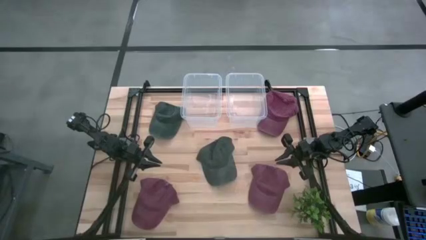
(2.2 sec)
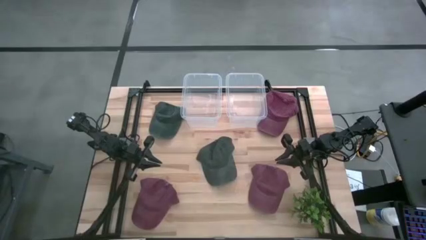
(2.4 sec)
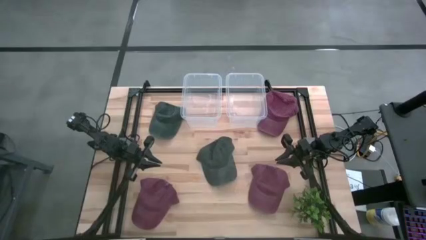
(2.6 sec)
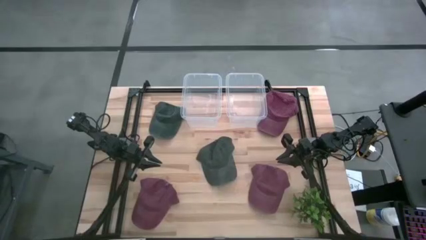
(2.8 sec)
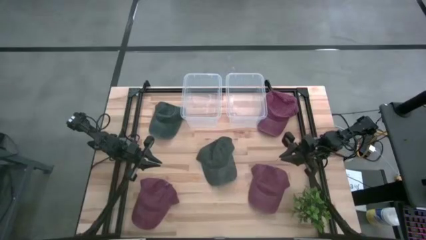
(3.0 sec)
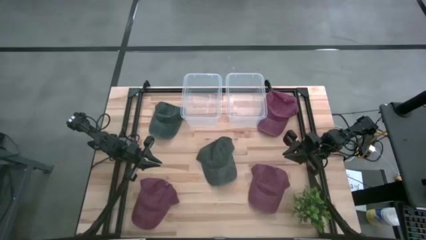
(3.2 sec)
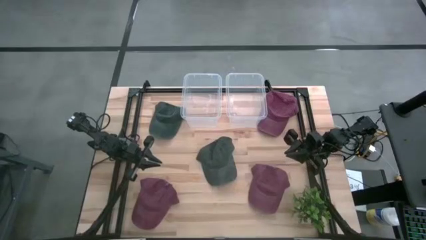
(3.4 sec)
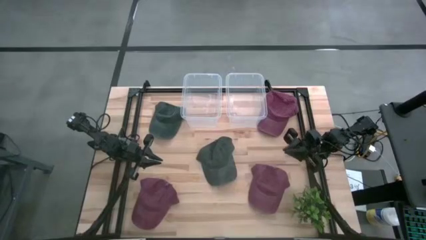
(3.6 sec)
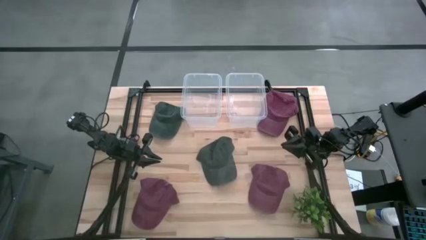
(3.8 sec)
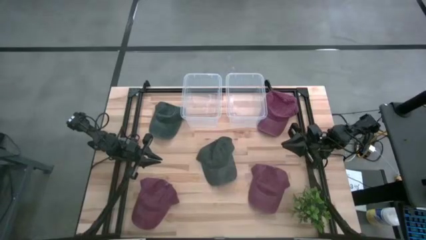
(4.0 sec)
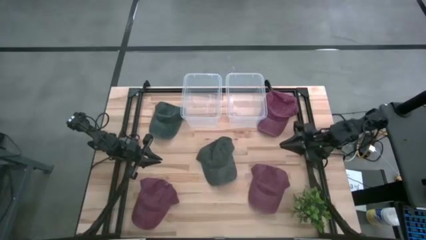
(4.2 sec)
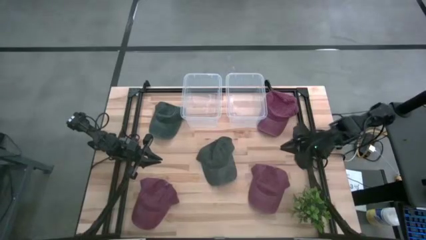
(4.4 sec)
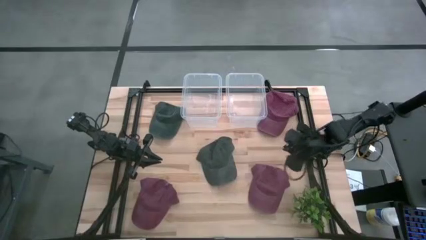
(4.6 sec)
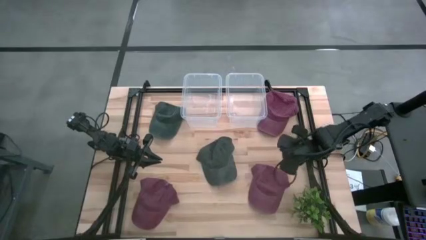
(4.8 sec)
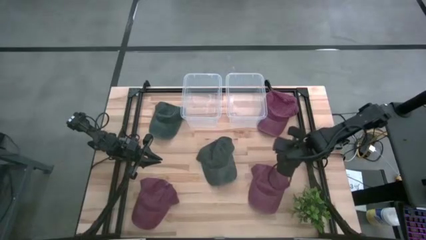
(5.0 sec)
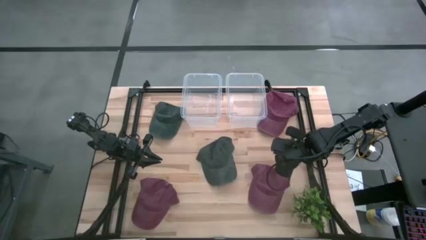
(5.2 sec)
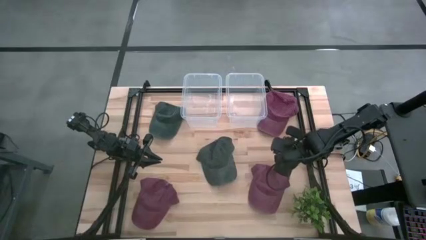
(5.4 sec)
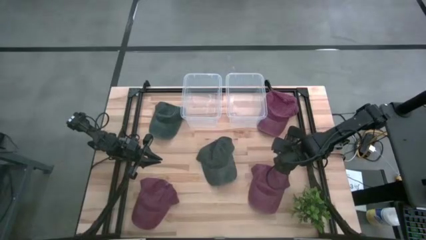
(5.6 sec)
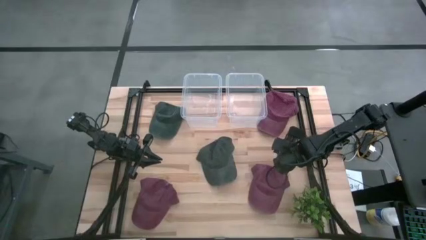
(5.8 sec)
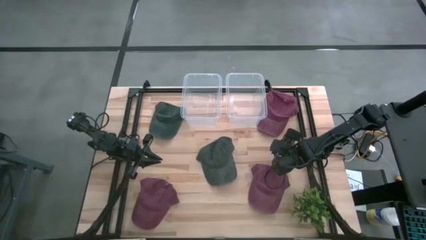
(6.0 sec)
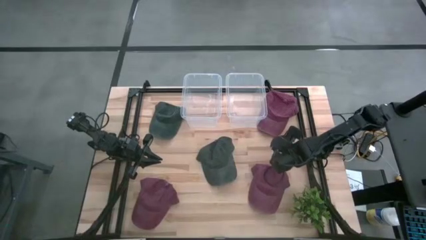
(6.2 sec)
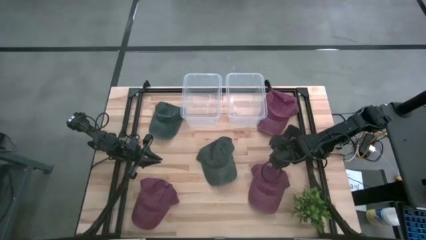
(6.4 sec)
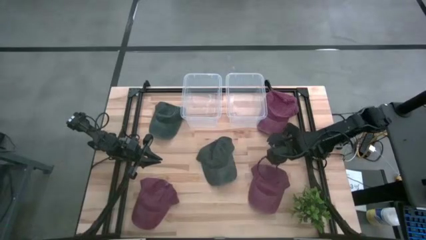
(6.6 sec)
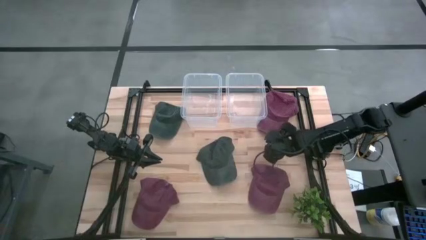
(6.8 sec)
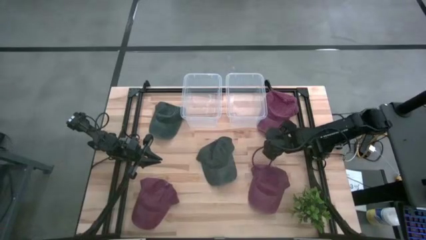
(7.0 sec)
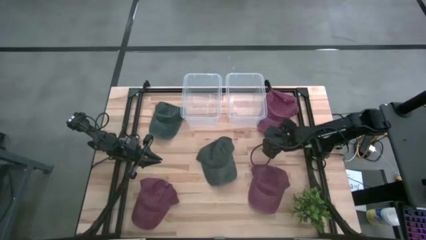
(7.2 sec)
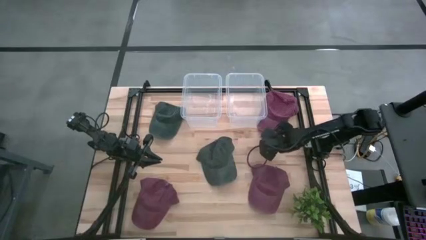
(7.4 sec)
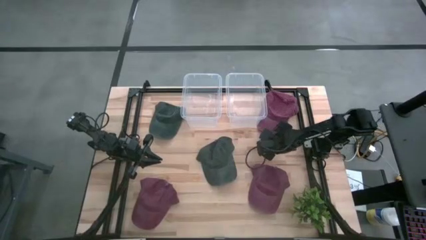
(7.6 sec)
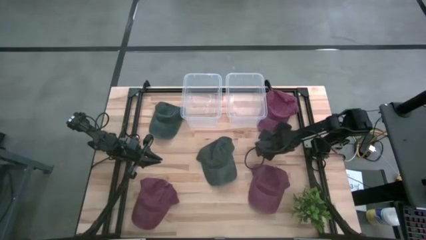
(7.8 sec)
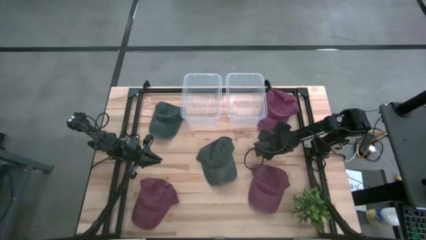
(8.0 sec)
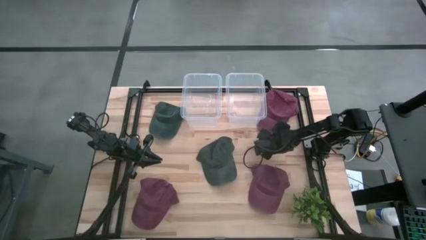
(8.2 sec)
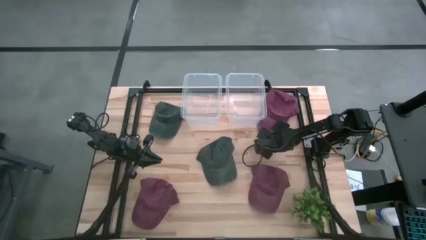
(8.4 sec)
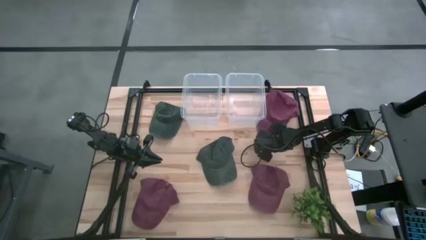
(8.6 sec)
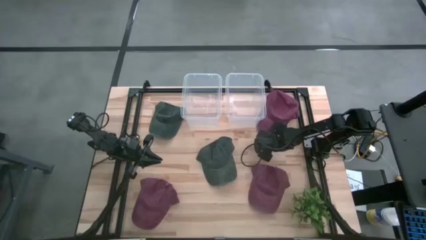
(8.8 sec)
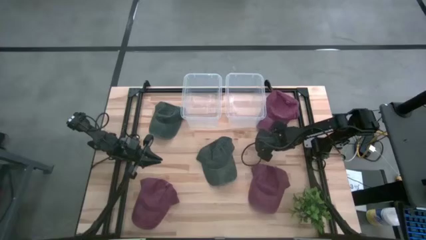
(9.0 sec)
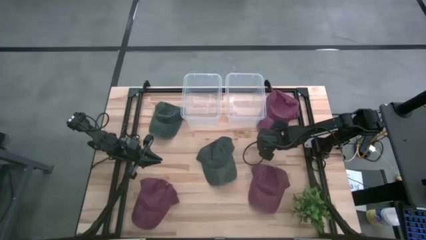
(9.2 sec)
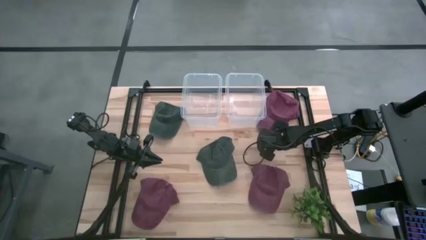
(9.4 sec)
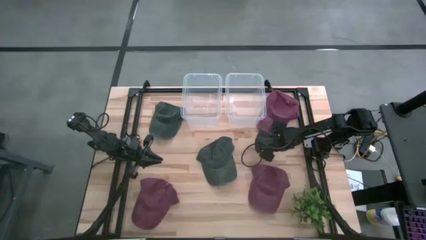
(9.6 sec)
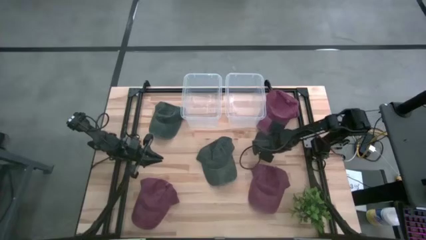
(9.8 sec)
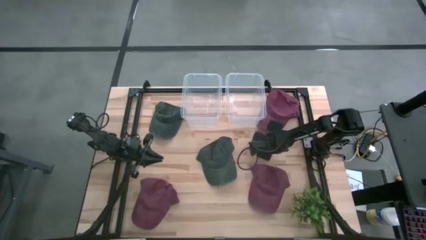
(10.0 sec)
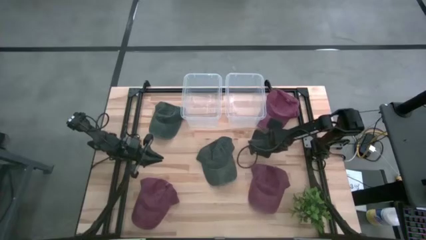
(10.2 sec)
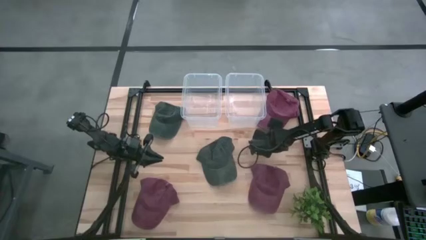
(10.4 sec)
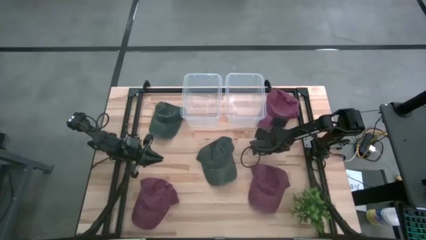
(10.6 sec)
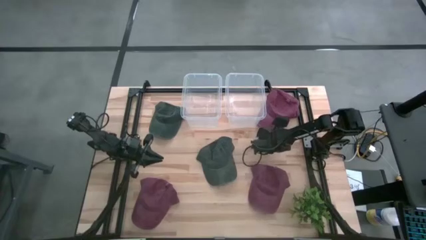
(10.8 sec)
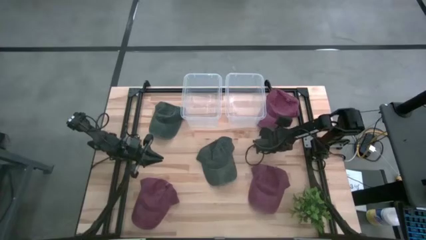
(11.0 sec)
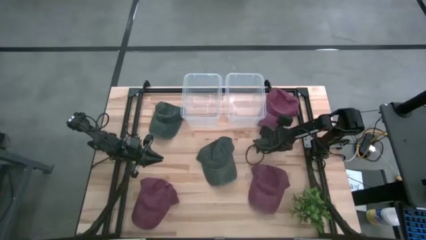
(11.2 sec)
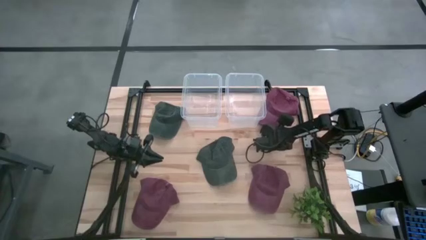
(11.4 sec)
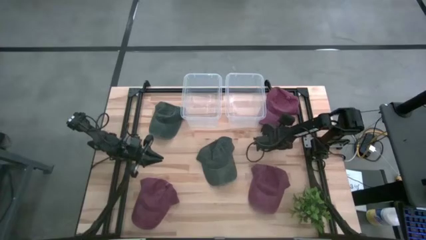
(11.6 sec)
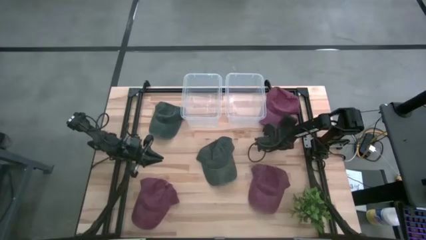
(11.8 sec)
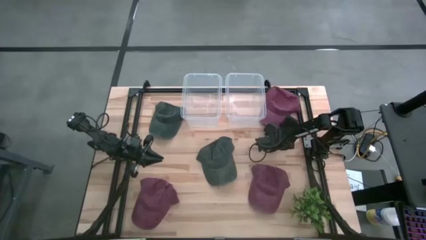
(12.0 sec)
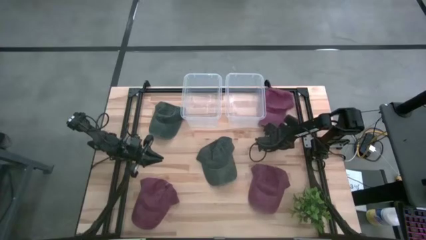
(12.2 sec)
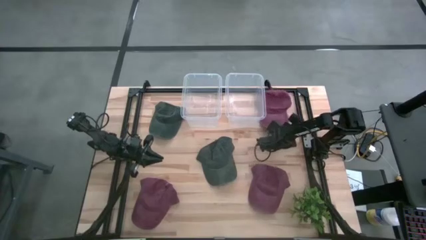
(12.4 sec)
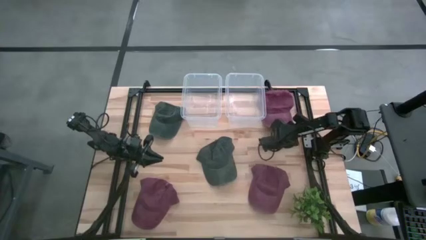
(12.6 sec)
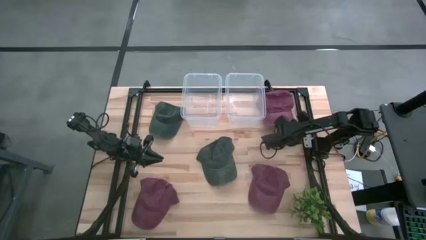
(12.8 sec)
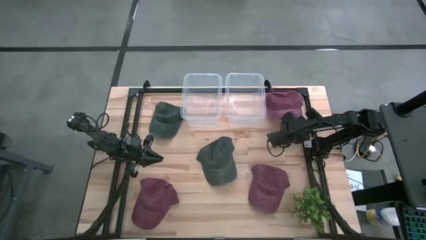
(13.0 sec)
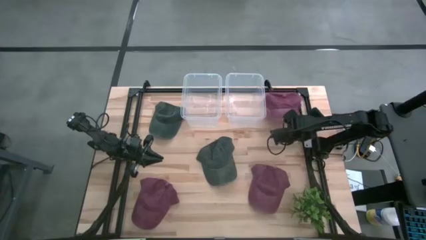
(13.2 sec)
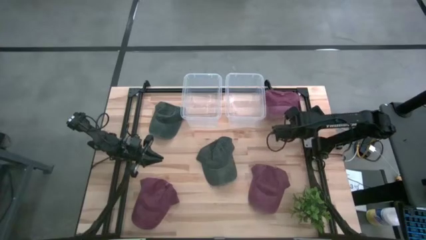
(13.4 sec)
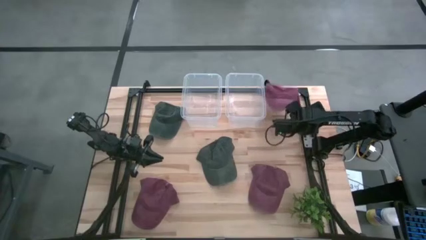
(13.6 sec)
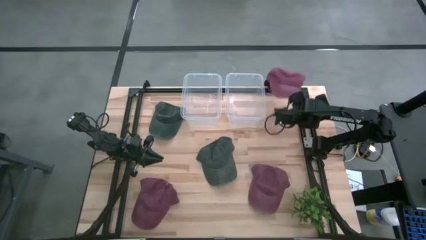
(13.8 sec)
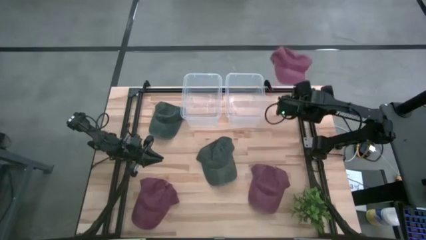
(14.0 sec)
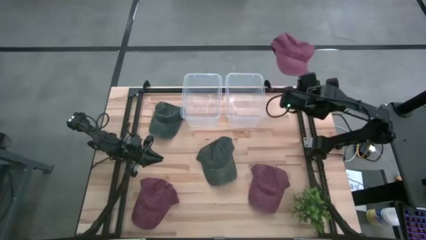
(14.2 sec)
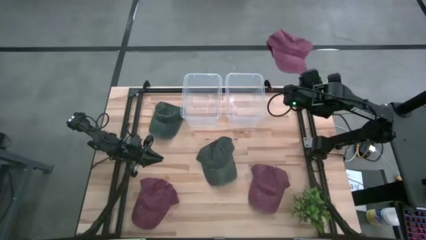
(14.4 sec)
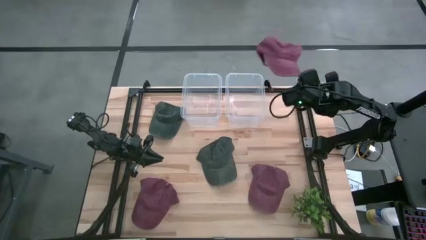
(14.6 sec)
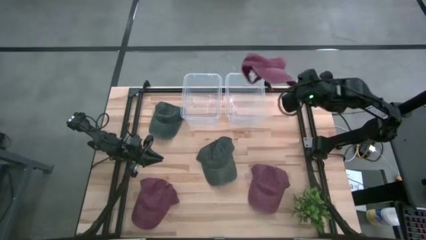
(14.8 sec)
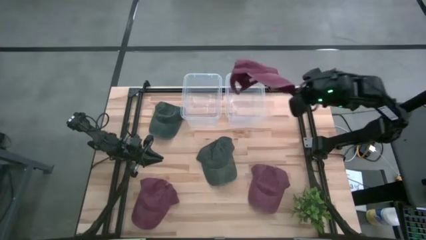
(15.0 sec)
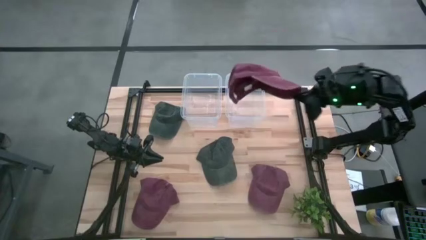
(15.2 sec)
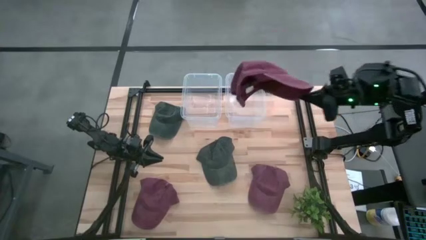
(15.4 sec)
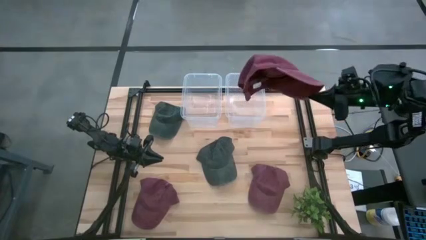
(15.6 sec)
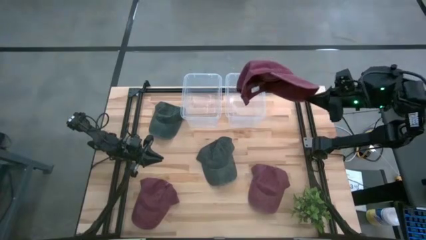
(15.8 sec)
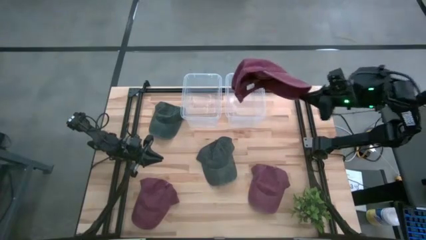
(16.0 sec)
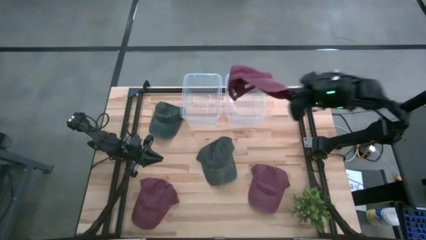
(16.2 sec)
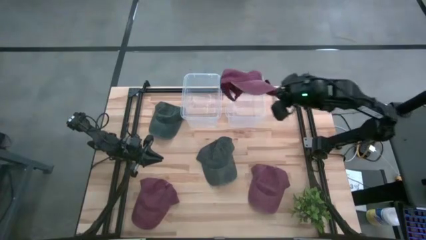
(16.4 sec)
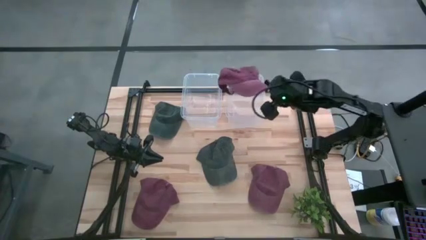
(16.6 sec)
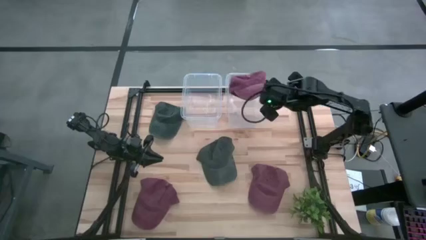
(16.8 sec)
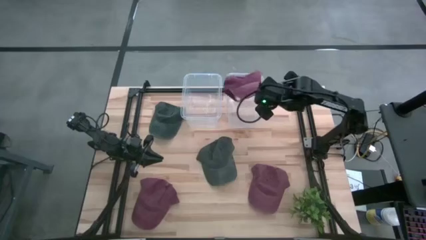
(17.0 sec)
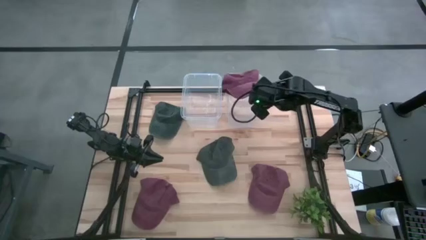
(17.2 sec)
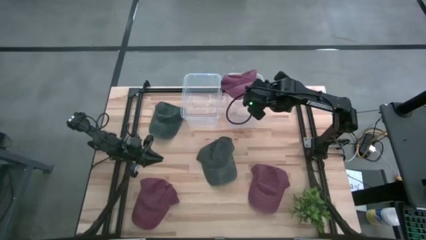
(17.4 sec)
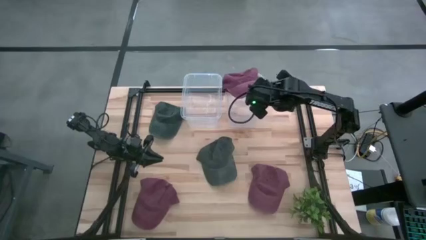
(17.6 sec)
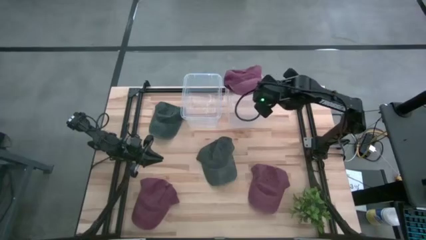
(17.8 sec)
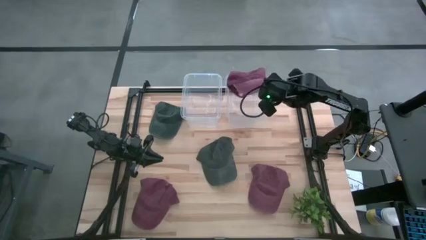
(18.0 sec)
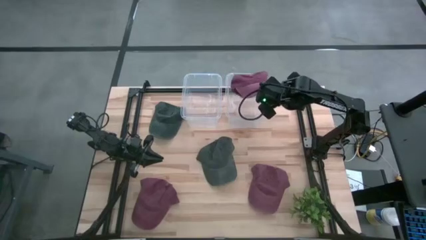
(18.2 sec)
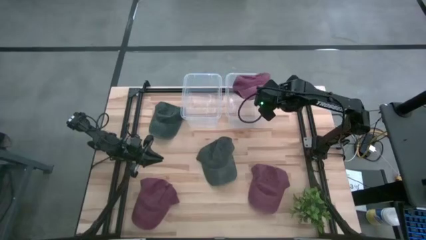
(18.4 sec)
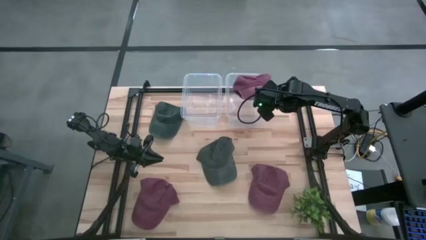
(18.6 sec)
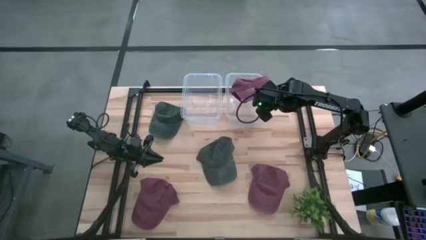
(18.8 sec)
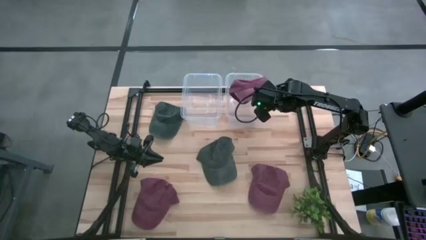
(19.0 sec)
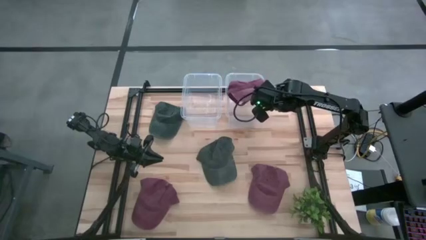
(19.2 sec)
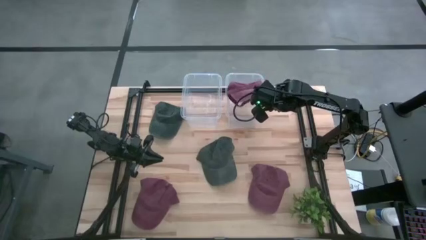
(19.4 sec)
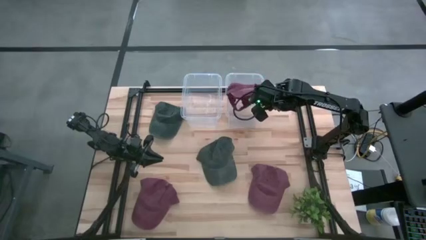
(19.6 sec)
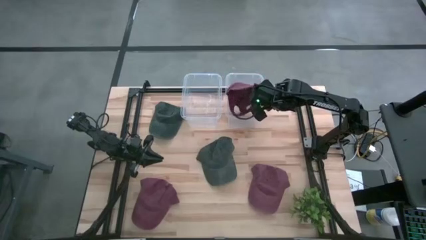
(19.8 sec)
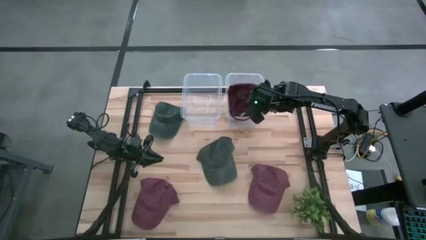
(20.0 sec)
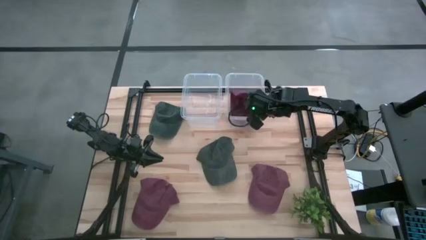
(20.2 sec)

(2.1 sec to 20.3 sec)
Task: Pick & Place hat
Put the top red cap into the right transparent bin
